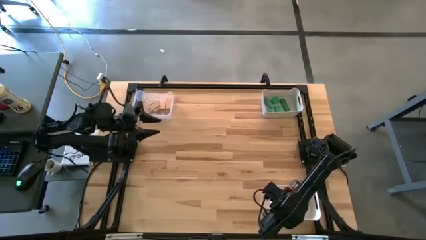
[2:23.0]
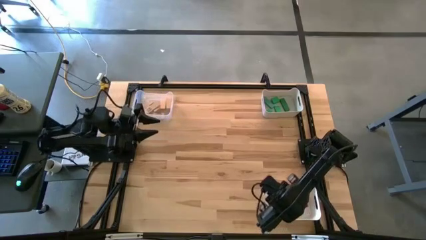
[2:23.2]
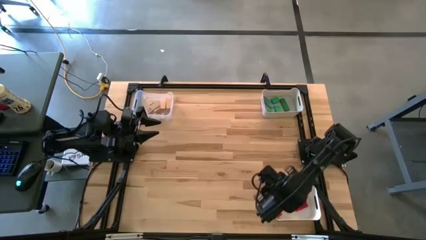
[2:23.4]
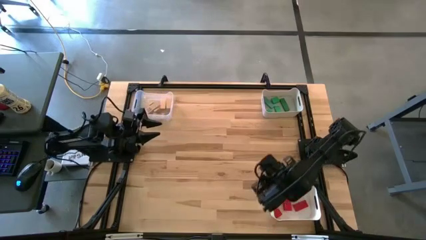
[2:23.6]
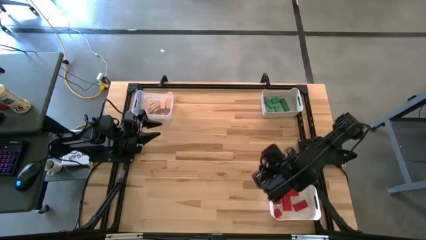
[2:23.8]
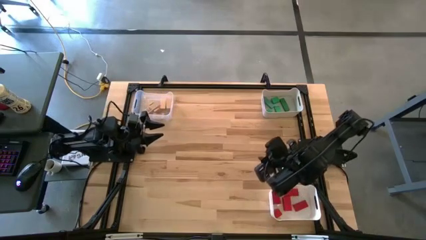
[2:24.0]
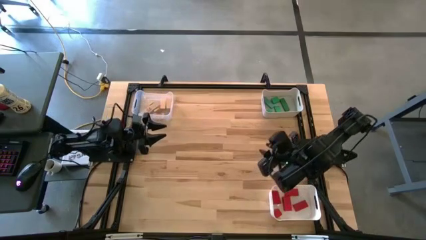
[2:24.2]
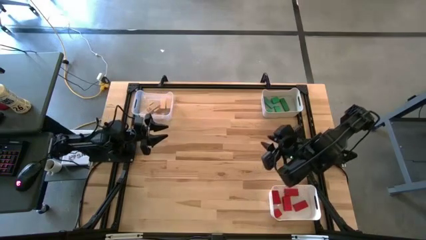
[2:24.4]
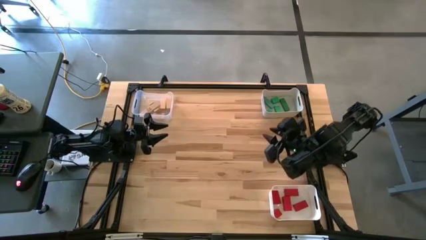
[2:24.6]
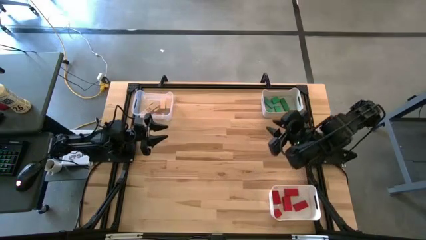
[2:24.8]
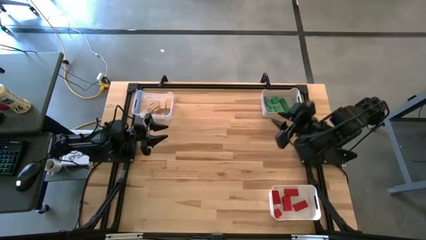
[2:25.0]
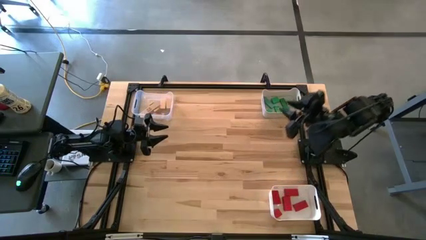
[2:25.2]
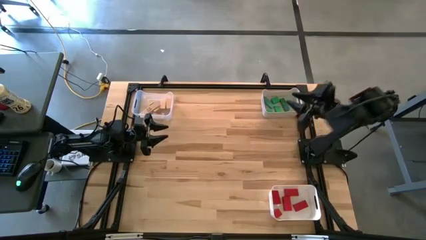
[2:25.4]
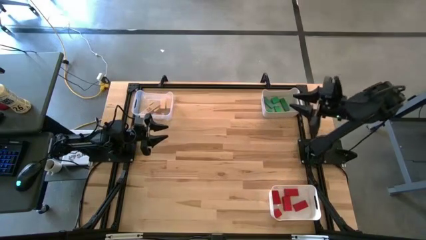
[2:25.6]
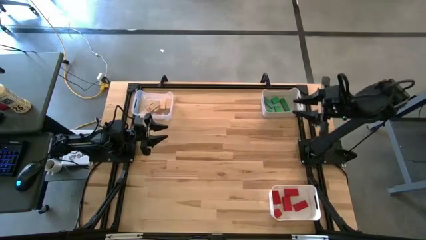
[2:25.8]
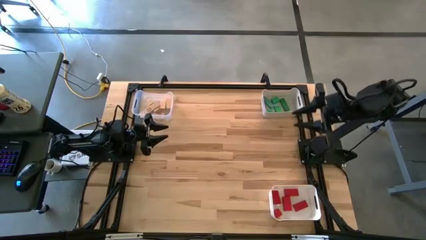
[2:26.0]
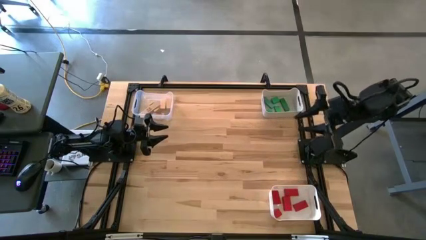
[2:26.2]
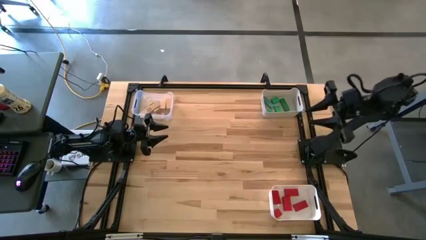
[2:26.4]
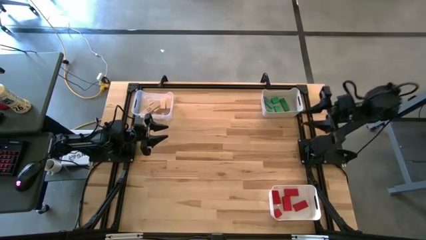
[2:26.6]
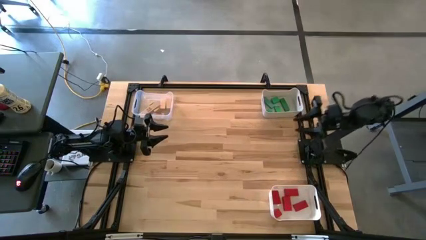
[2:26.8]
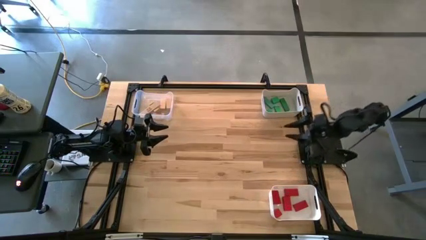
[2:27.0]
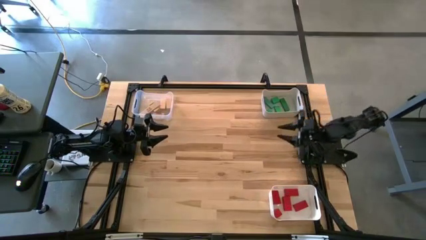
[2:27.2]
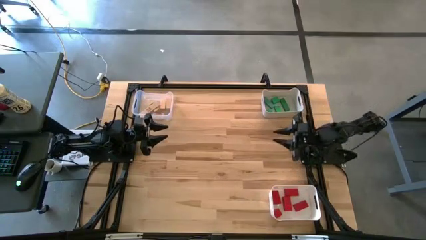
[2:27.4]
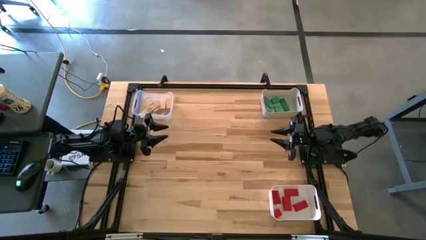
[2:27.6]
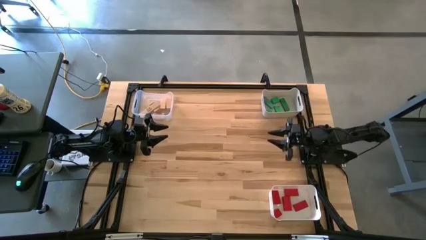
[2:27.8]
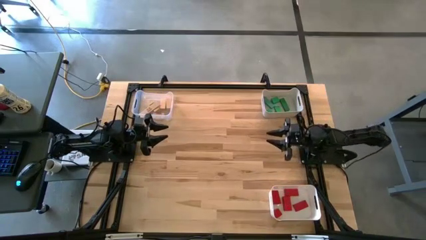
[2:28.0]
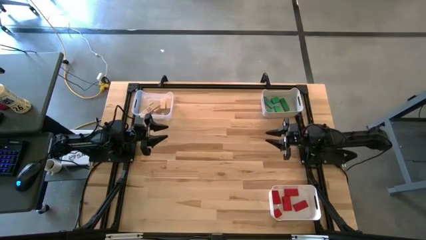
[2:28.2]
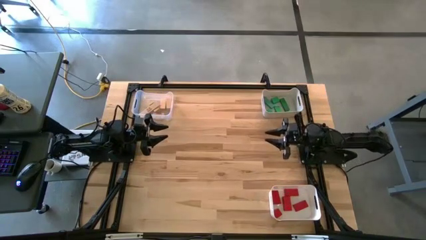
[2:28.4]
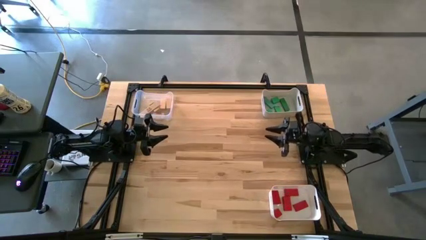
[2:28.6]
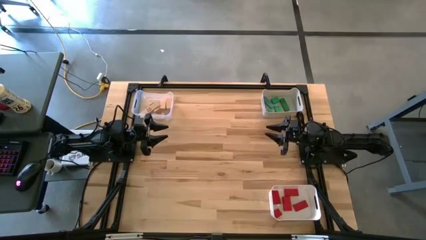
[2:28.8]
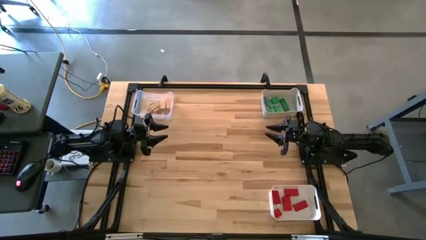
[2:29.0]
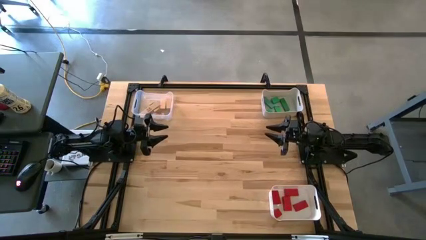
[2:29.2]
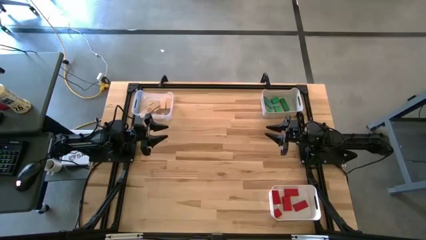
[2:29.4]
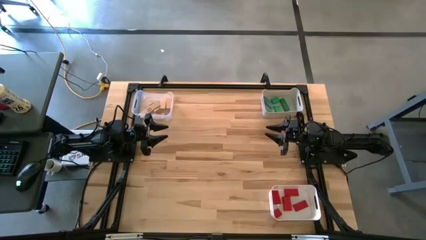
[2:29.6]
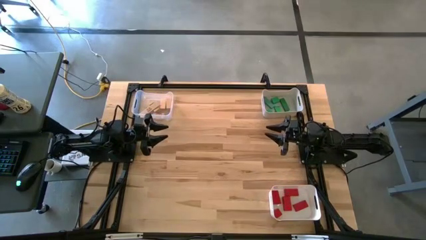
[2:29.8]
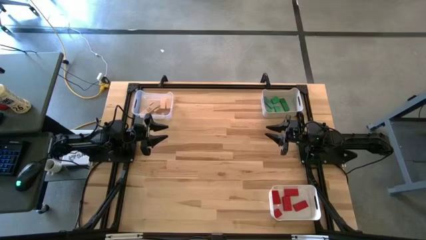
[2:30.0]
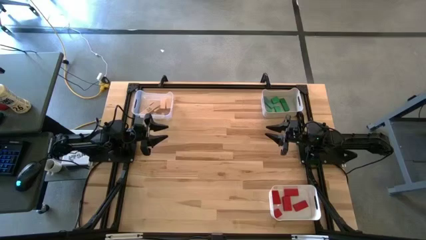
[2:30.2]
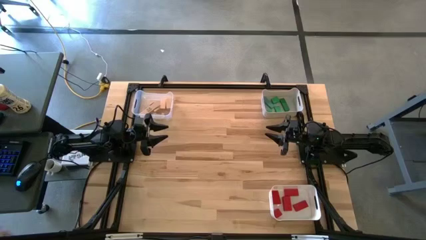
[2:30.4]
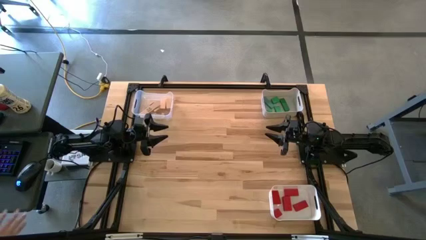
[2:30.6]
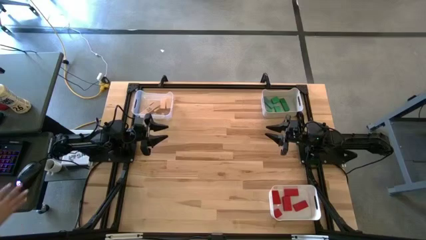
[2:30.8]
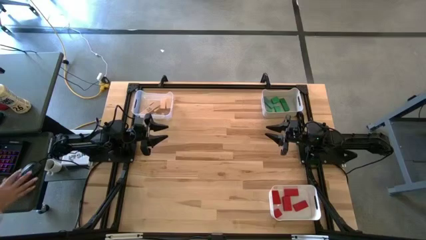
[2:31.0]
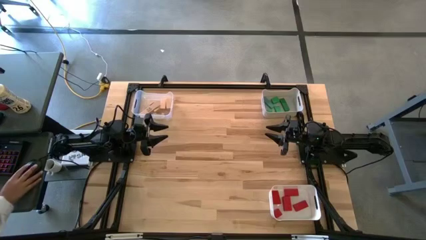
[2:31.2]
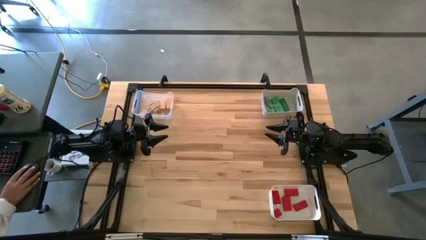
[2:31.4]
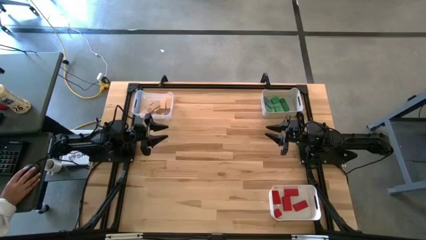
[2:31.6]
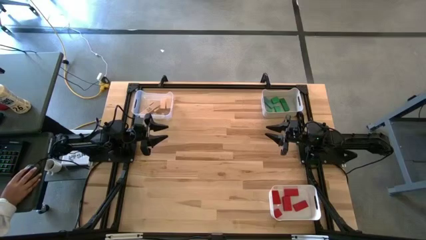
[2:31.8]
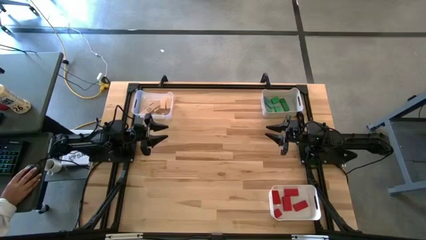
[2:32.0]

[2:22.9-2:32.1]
Task: Sort & place blocks by color
Return to Home Position

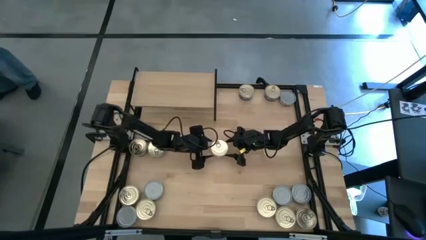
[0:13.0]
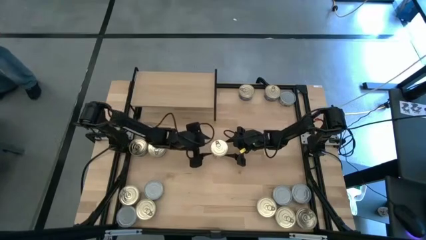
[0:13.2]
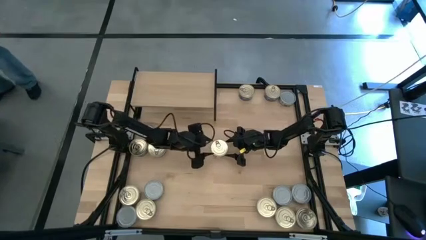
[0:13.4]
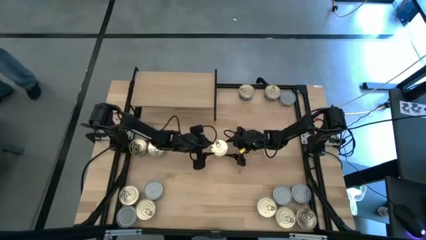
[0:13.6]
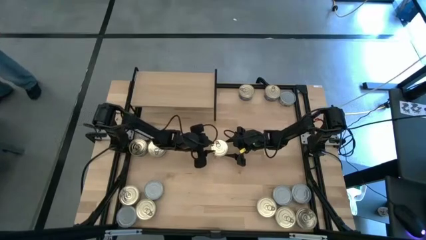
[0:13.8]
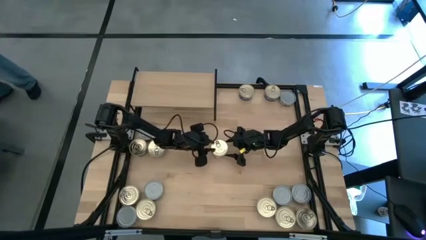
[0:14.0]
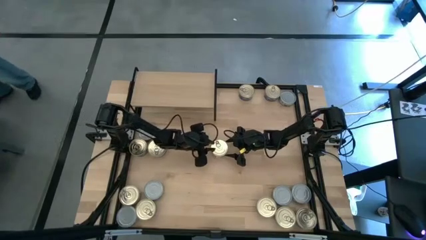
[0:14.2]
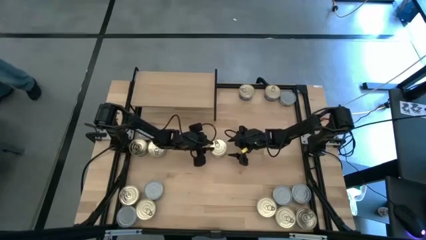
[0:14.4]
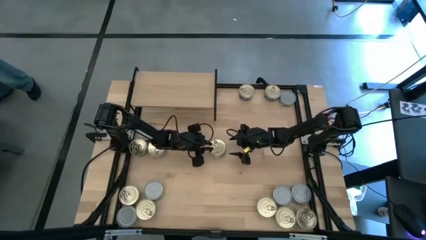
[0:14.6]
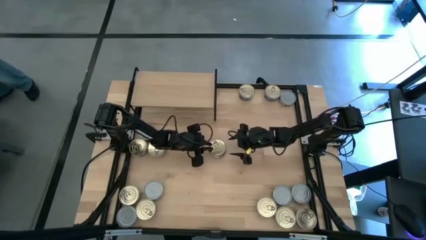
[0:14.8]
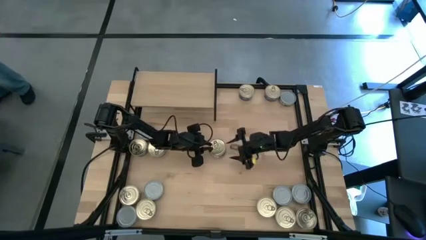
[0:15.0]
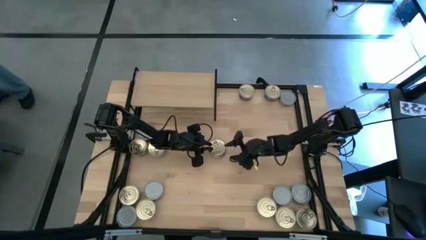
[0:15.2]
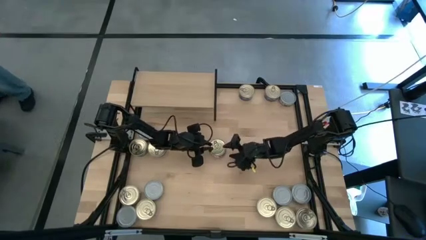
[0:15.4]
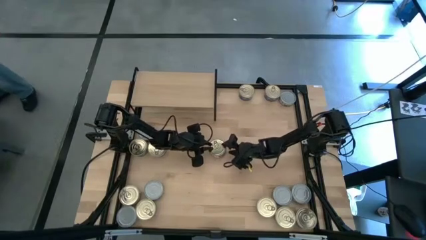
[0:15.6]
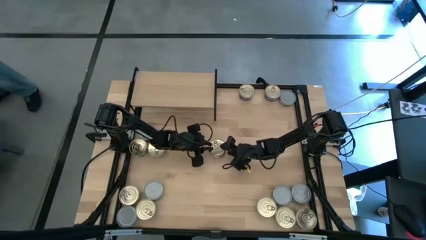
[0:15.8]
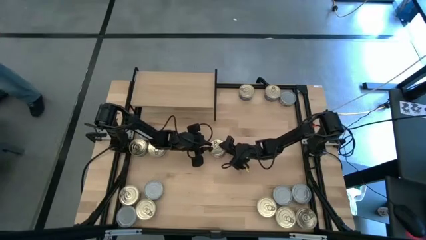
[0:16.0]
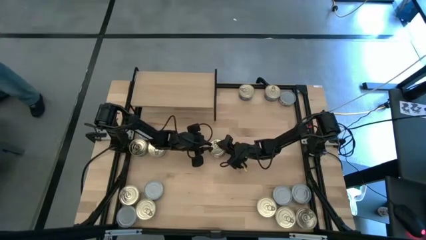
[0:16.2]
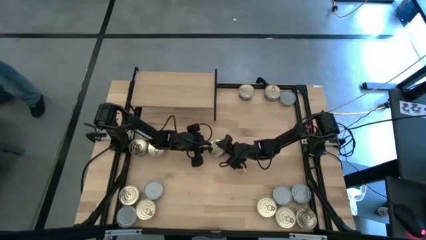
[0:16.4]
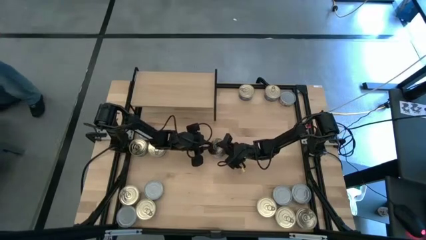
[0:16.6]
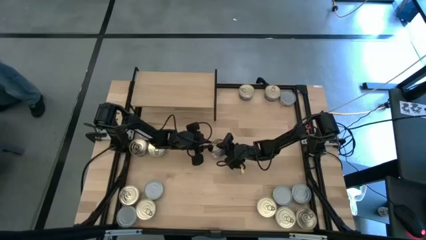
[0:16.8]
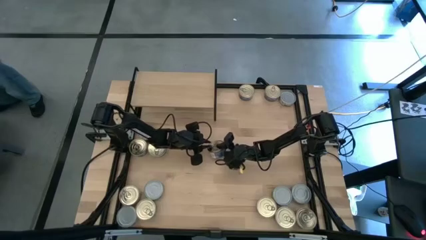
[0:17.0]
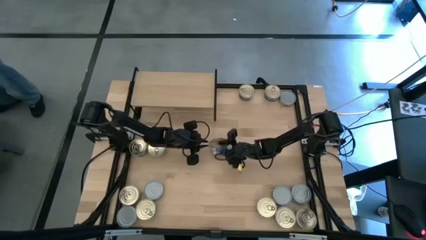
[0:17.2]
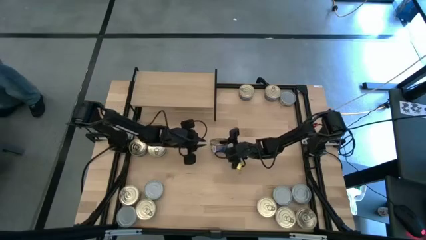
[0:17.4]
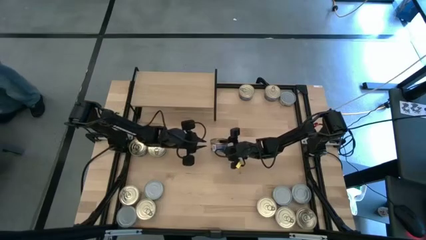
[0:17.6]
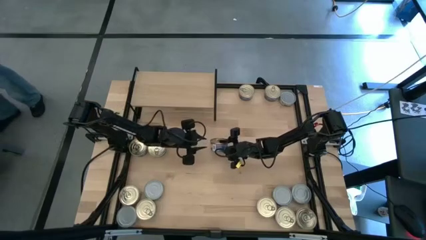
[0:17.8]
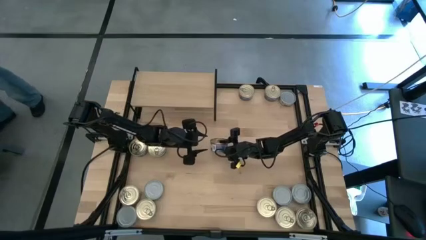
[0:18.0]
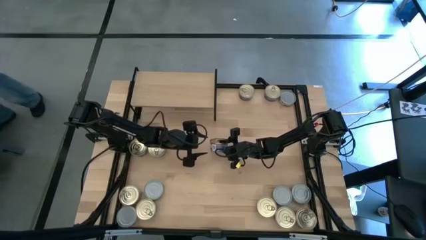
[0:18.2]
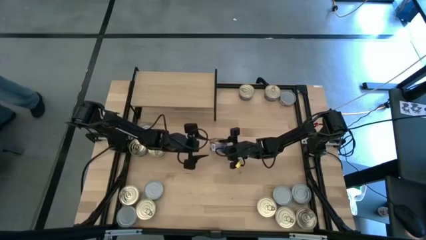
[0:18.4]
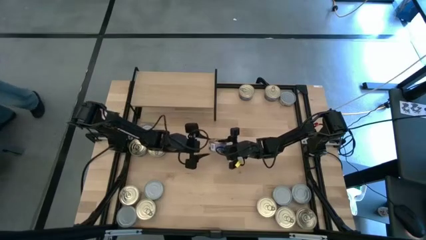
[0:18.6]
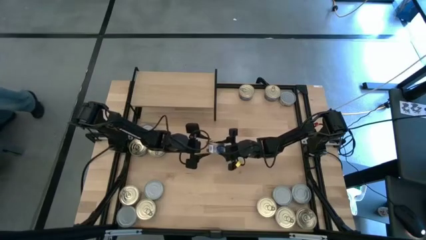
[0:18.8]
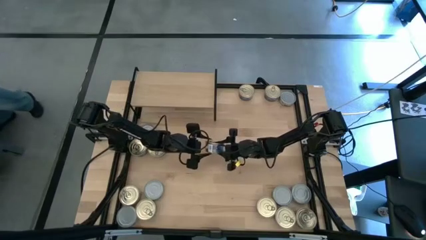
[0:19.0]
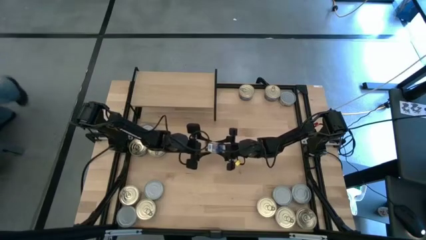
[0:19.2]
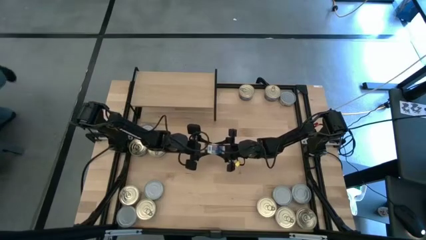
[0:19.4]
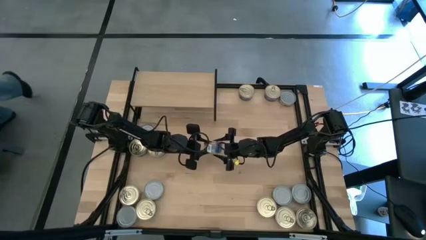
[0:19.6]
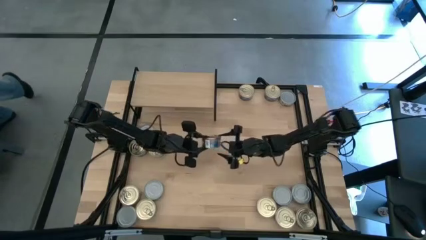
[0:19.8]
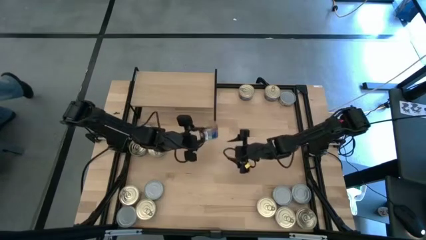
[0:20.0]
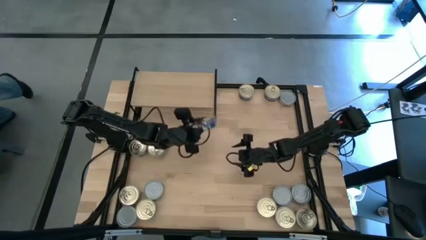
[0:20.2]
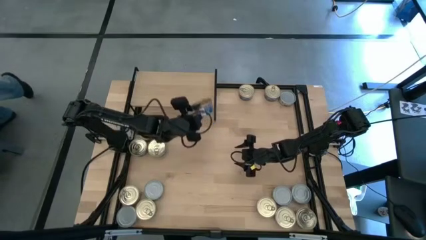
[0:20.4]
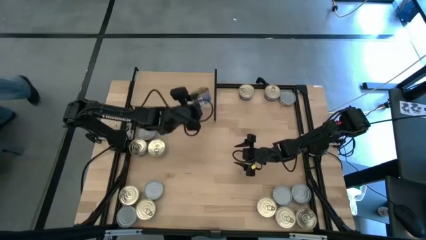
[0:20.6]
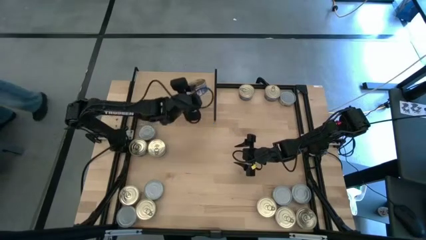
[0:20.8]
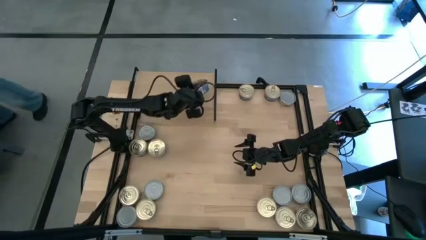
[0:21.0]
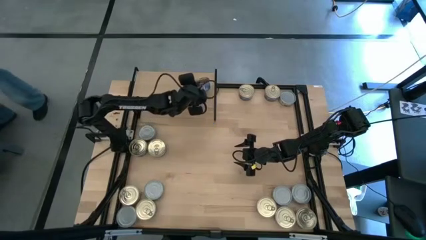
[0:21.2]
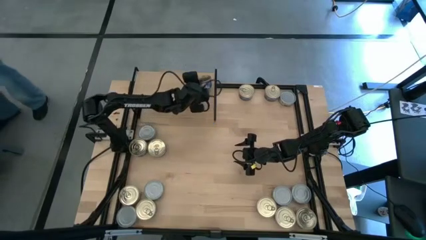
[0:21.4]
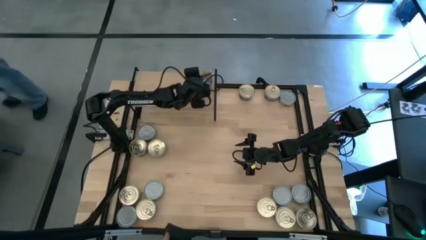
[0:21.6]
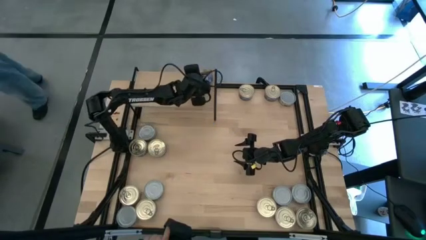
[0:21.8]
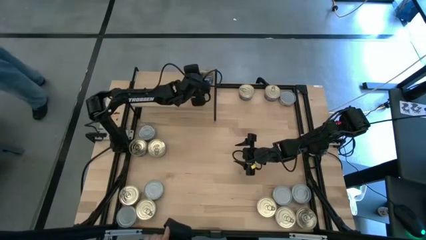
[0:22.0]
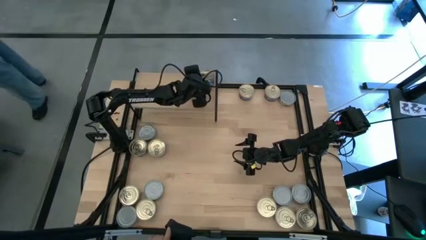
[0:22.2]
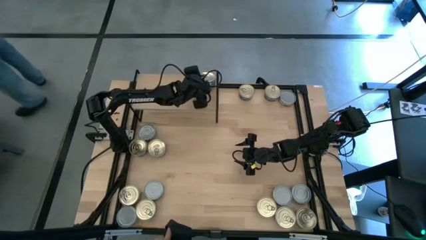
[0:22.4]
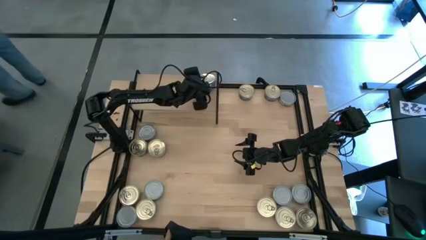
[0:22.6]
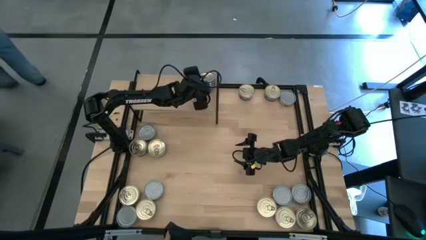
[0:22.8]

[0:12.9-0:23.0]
Task: Stack canned seafood by type on shelf
Put the blue tuna can on the shelf
